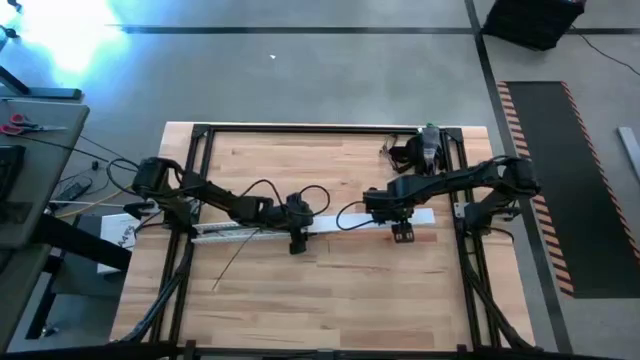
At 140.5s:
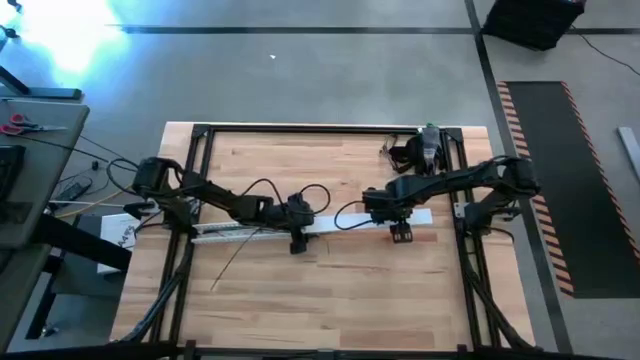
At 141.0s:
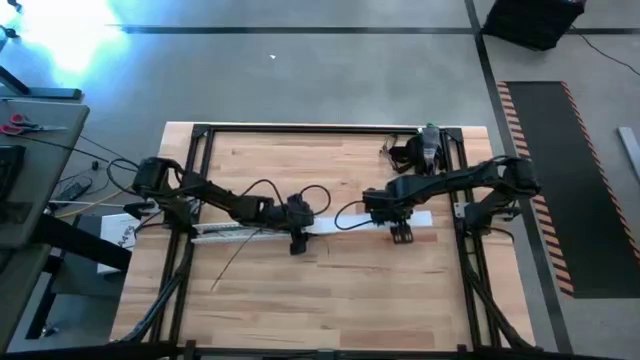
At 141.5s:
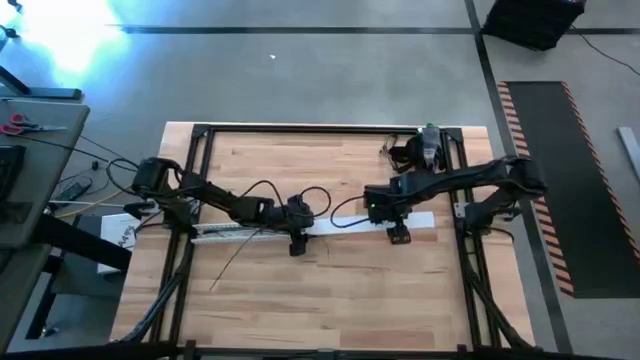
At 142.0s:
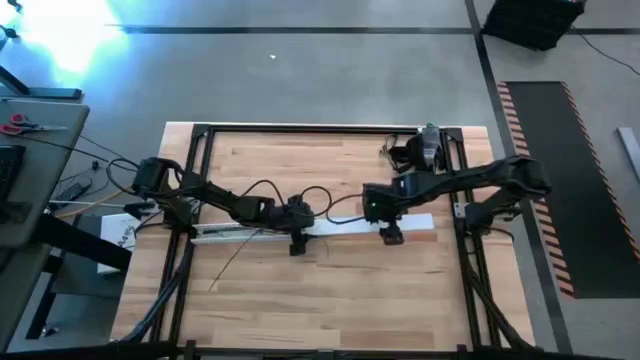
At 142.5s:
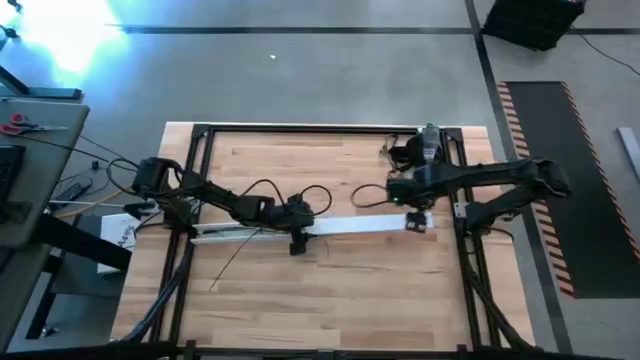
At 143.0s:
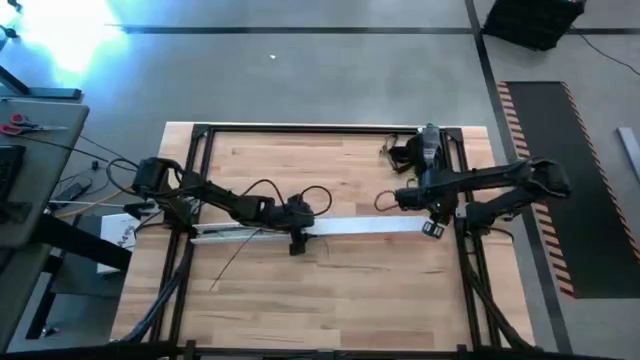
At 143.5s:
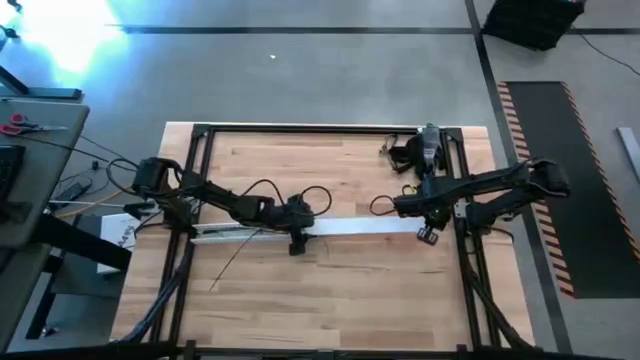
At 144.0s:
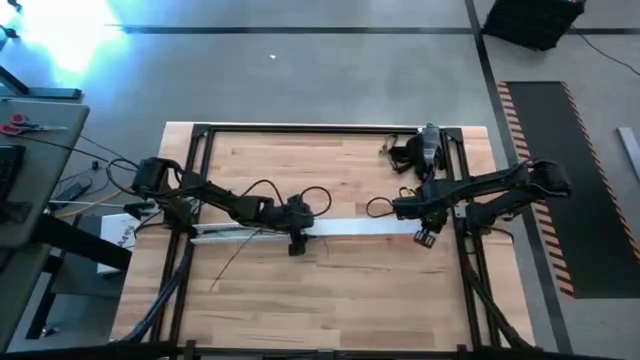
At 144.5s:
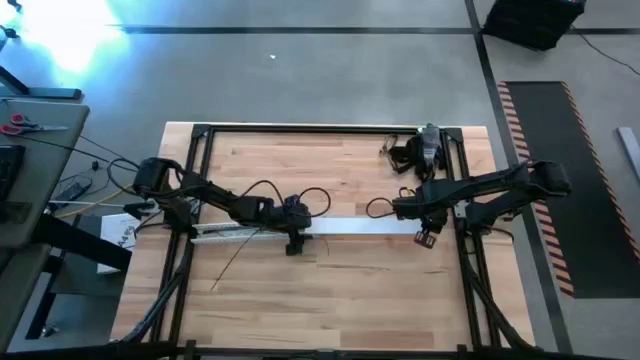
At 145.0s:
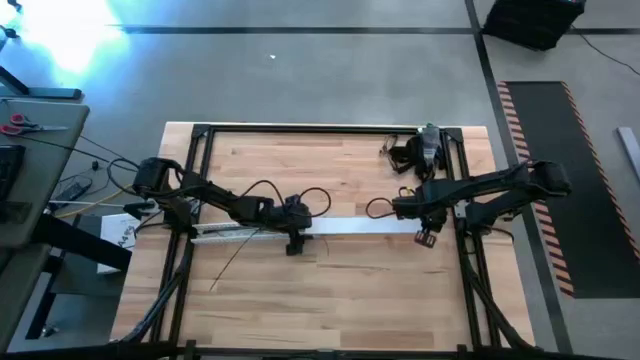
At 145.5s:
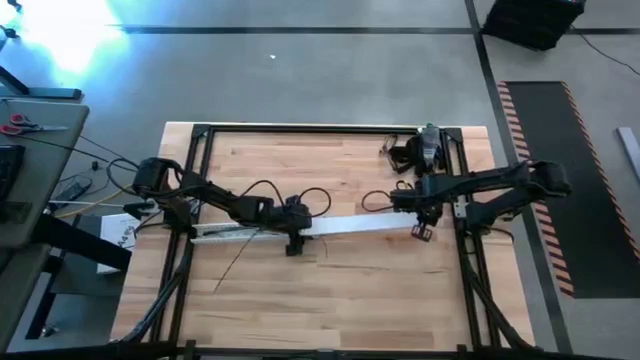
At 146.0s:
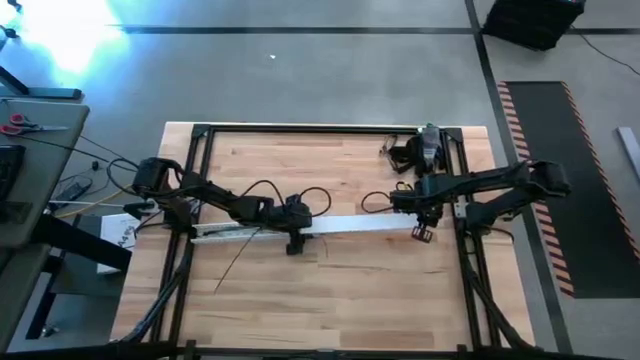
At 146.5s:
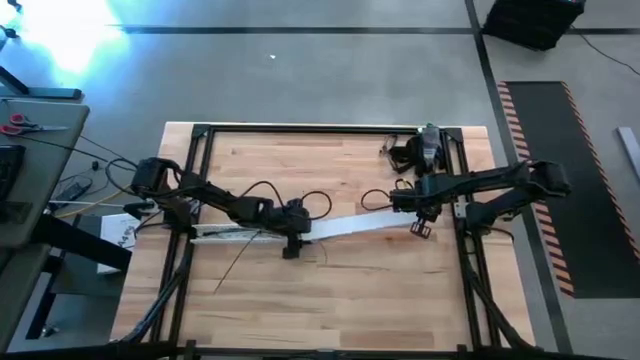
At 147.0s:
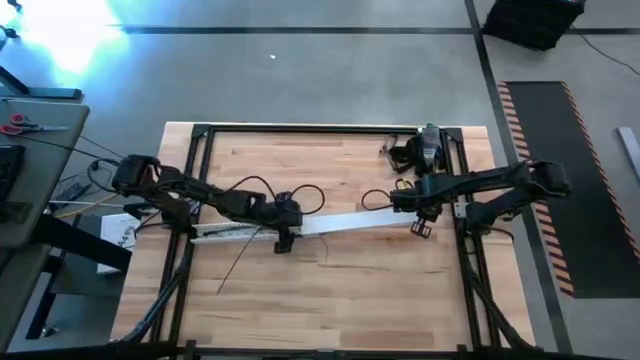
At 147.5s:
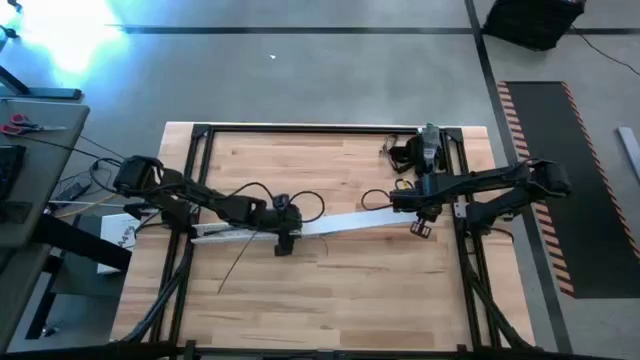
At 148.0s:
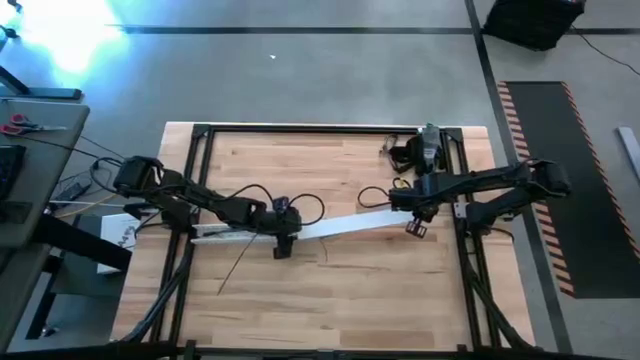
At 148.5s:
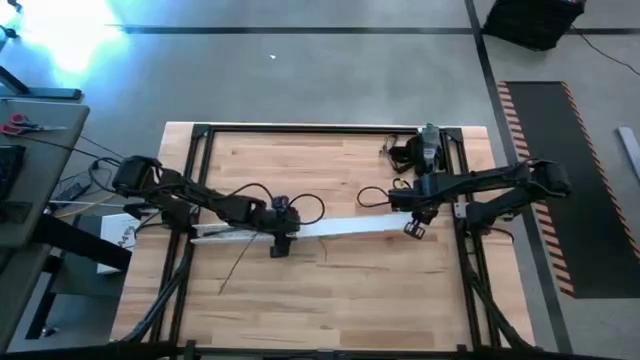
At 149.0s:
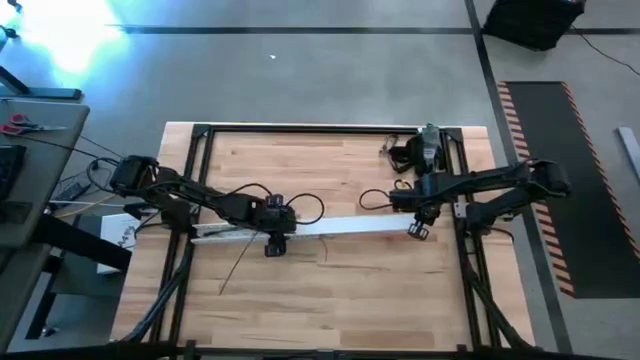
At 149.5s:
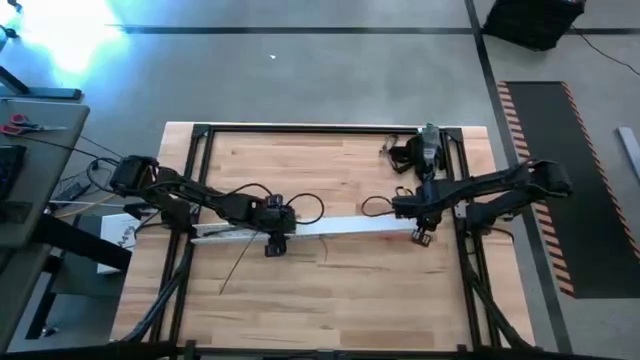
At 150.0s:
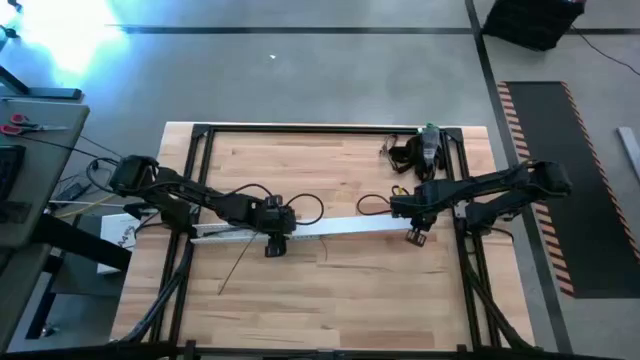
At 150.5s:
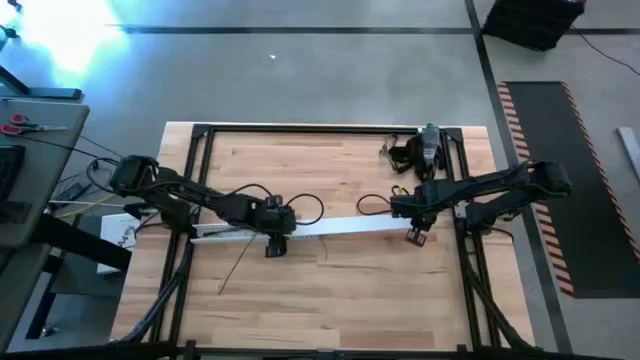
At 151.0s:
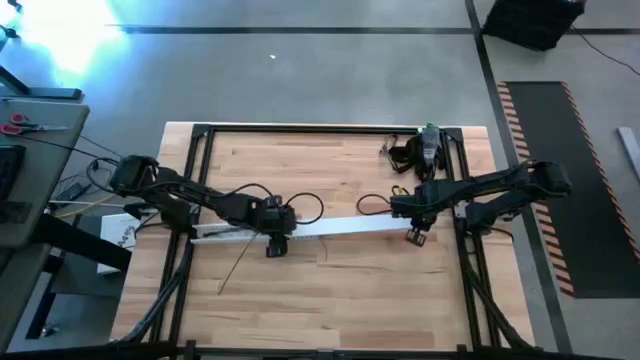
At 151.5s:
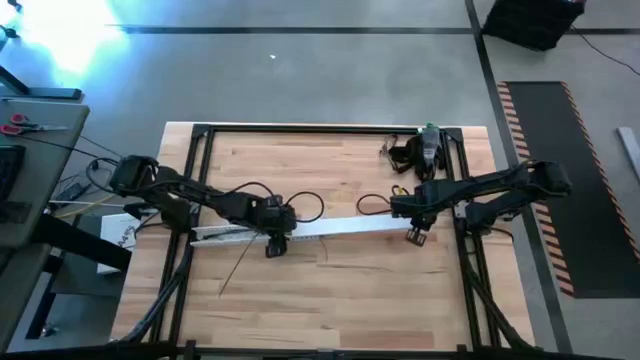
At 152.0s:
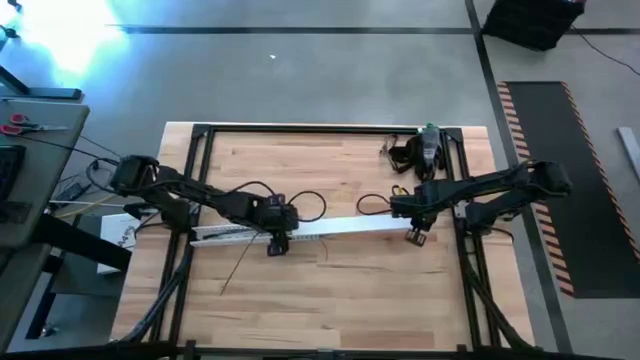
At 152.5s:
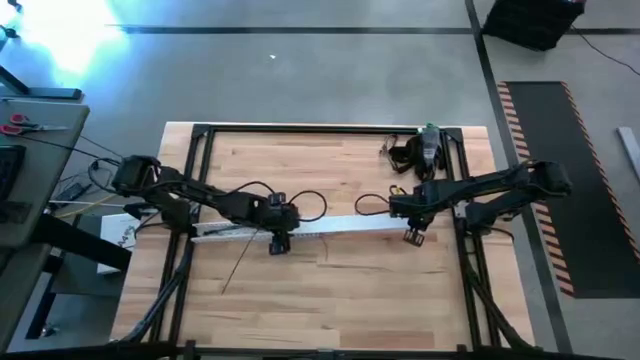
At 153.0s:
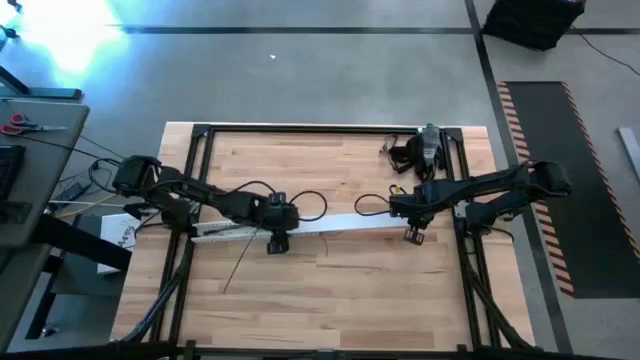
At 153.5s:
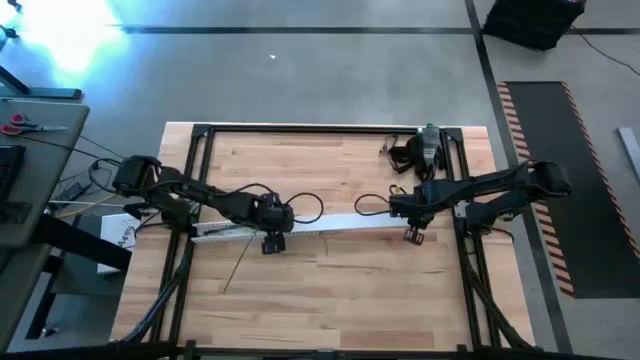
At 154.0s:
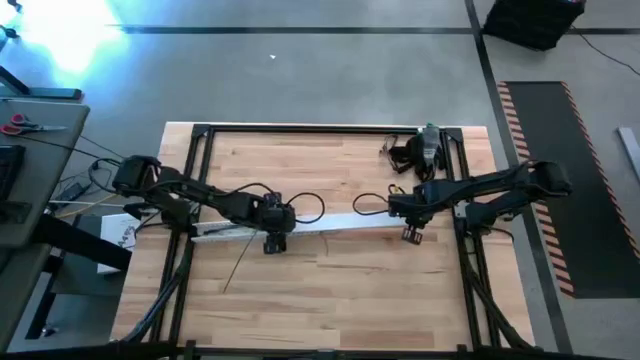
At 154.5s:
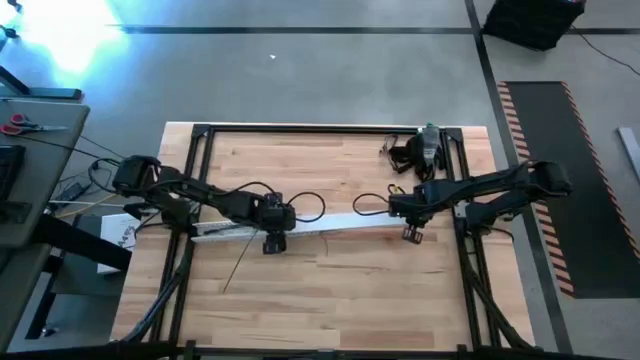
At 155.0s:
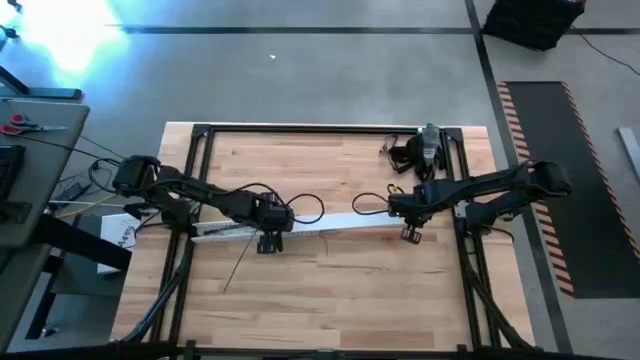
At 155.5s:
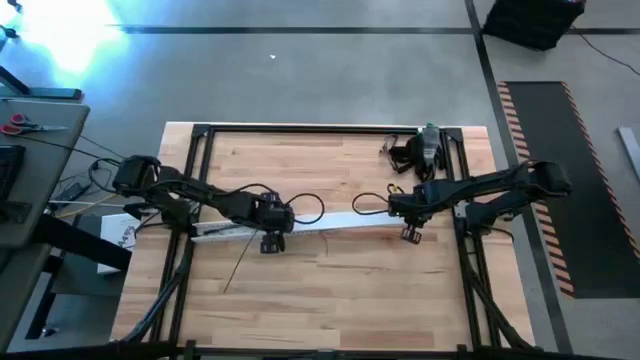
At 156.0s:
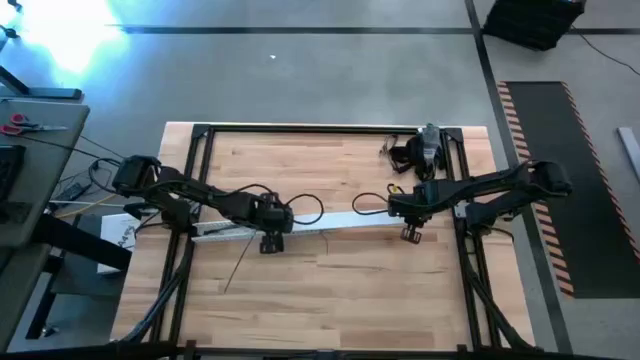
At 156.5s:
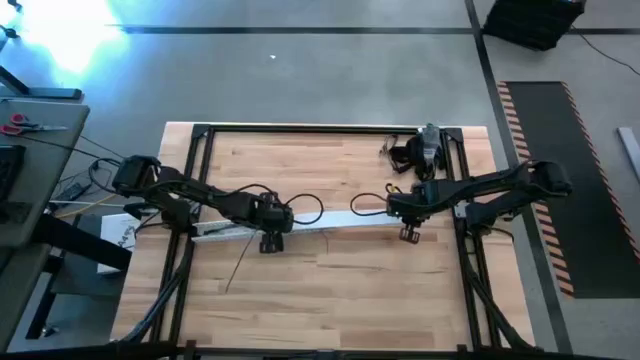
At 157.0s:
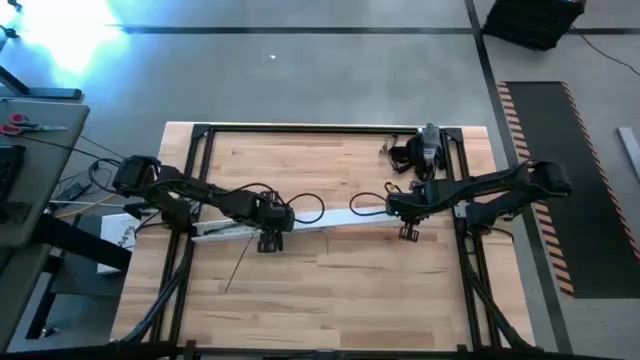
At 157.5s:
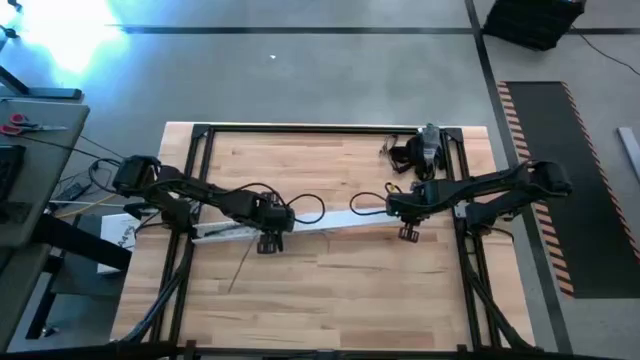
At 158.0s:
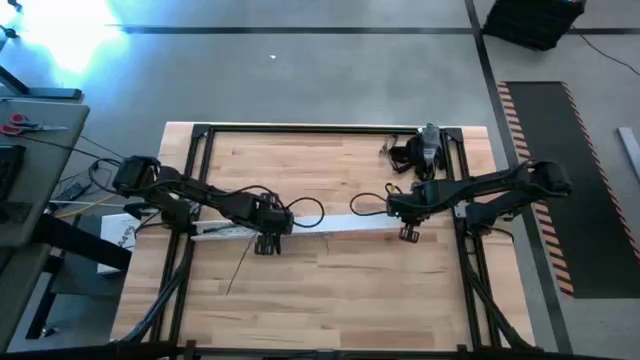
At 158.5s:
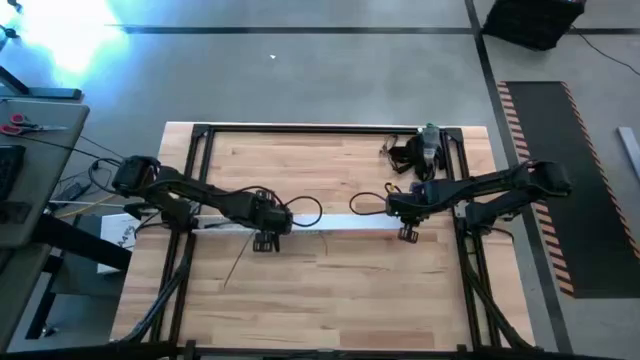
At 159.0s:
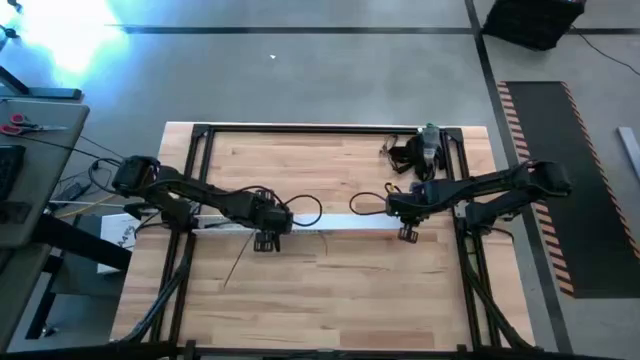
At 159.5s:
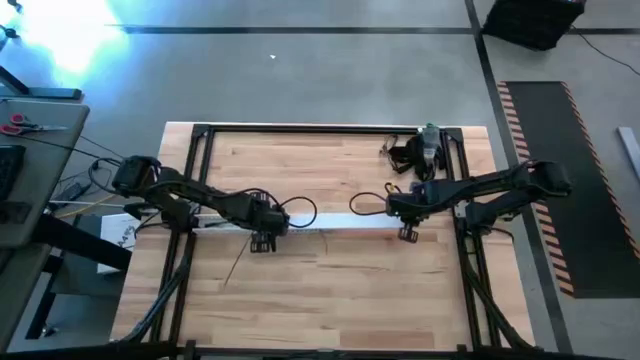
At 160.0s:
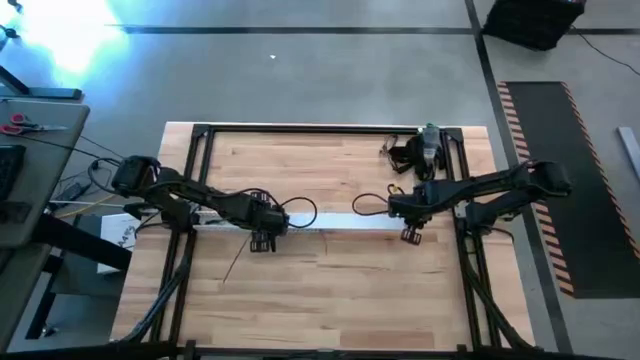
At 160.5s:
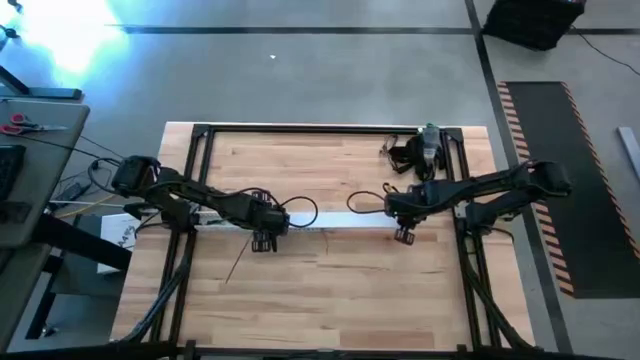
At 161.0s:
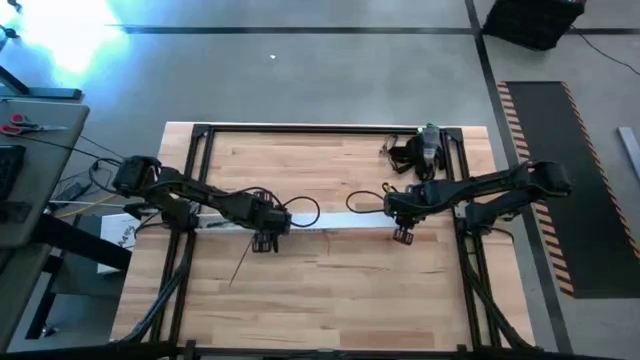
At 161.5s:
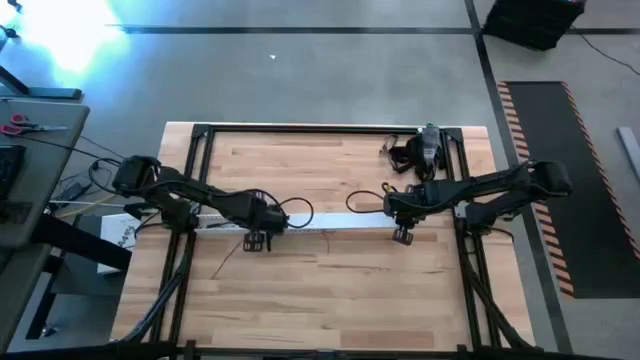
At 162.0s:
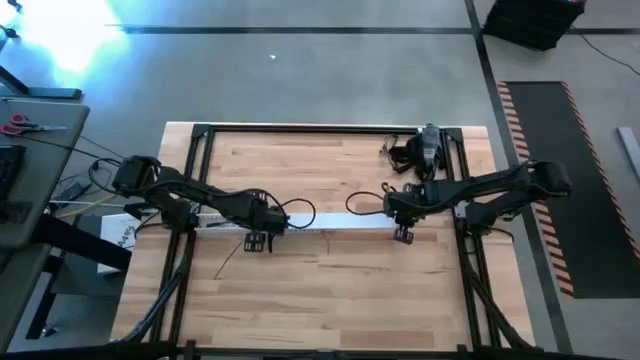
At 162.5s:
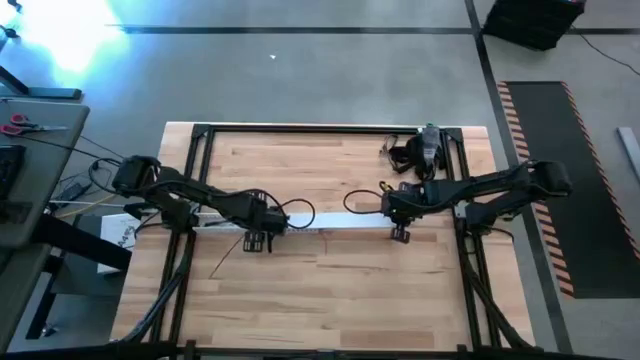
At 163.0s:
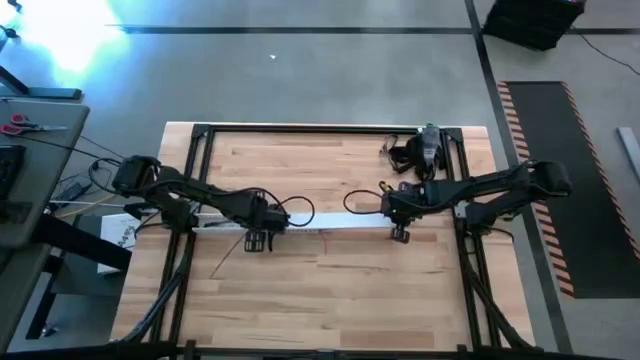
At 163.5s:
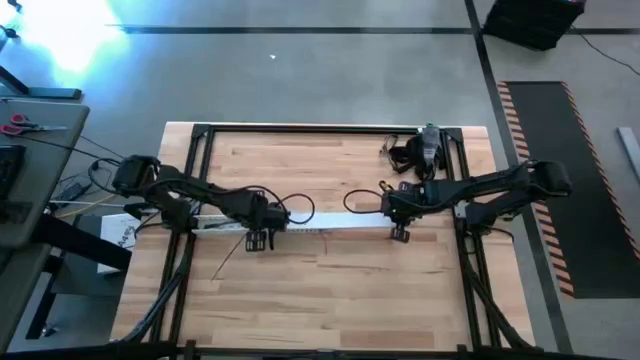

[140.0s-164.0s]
Task: Ziptie cables
Close the white cable duct
